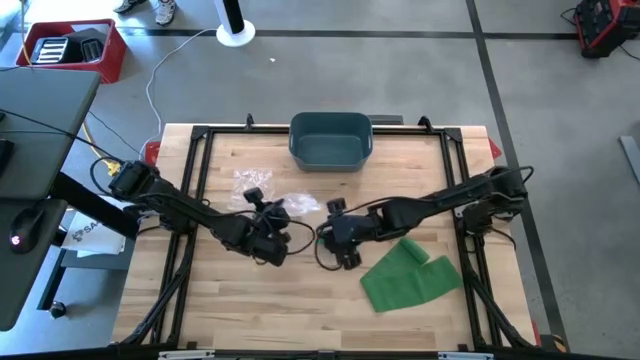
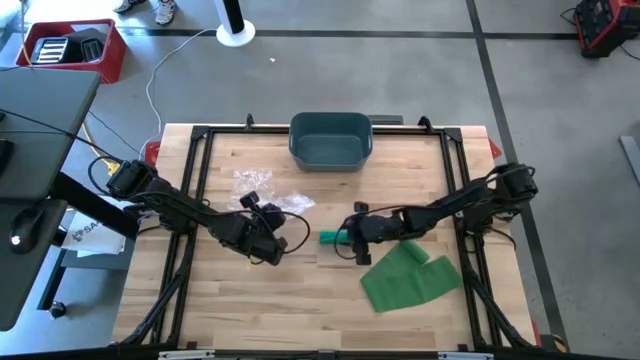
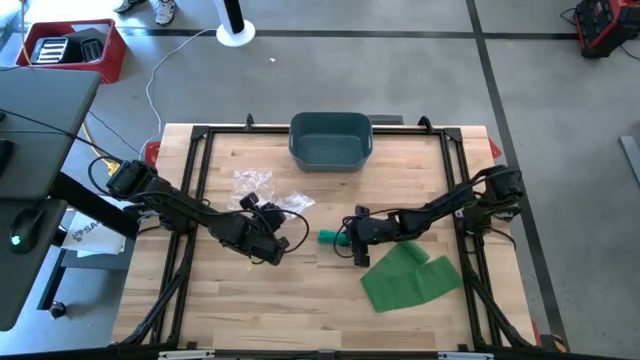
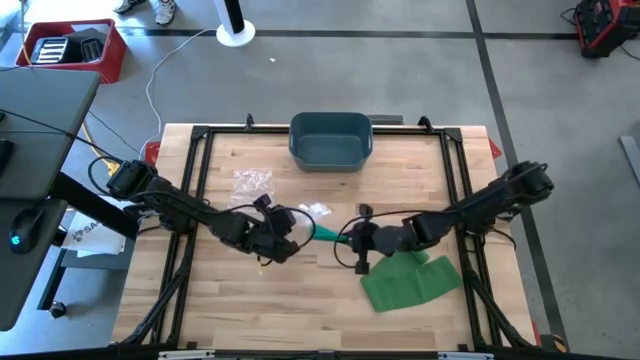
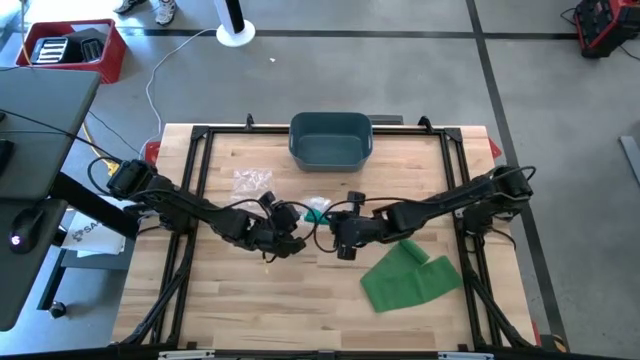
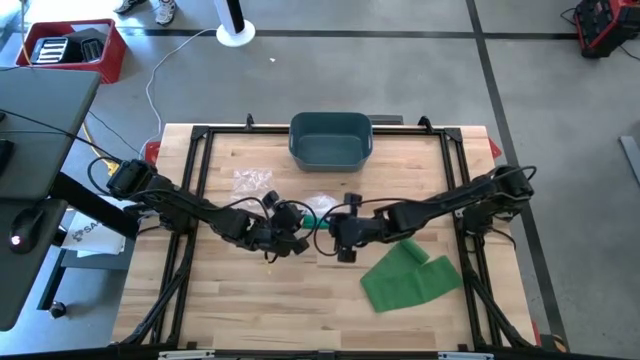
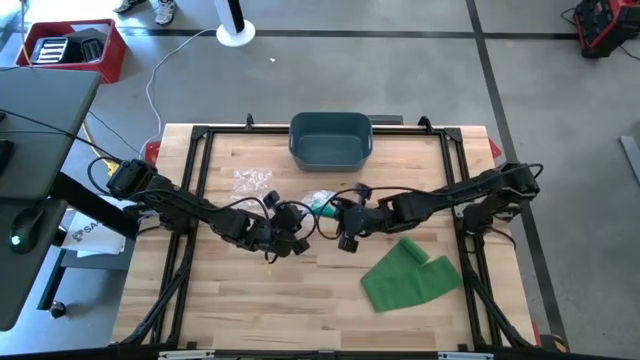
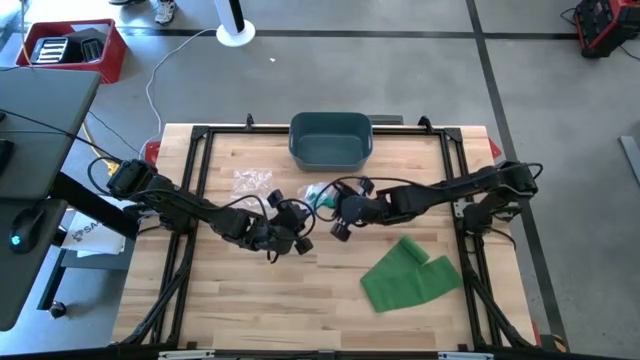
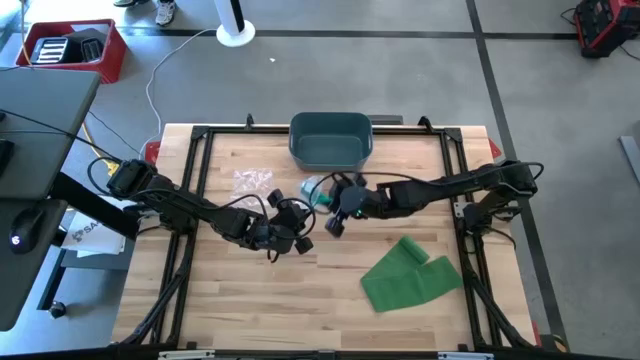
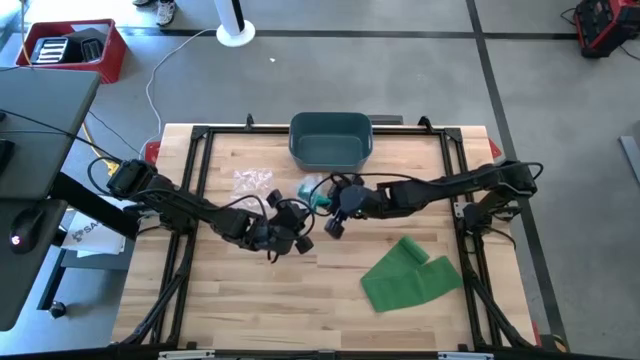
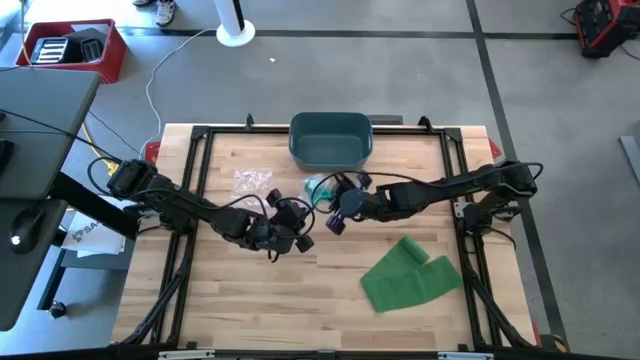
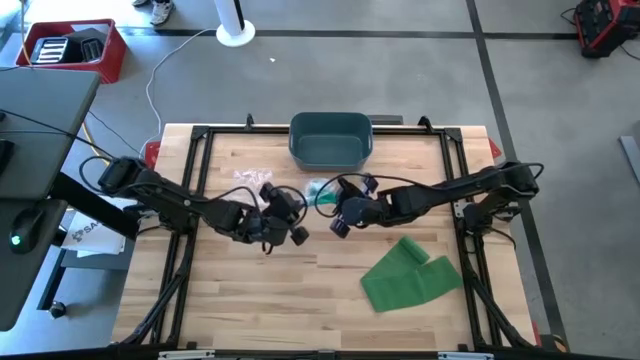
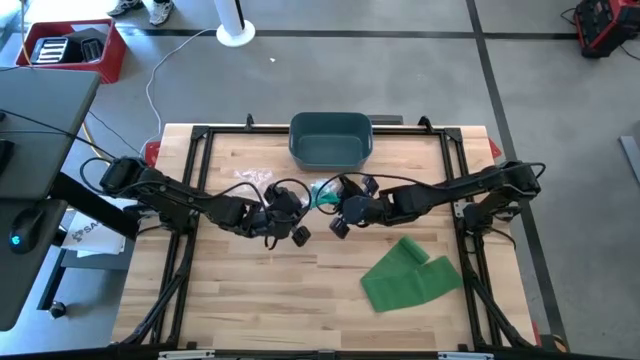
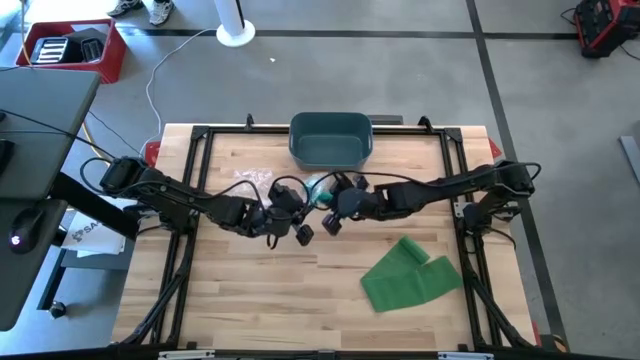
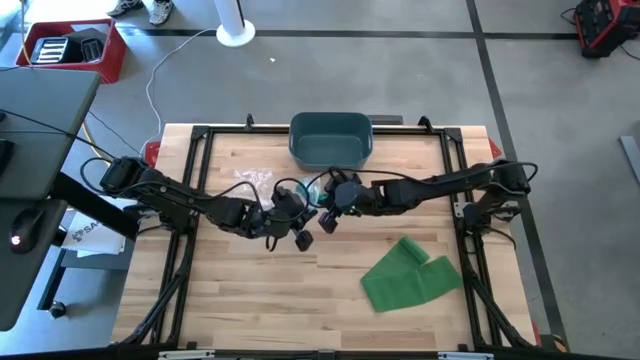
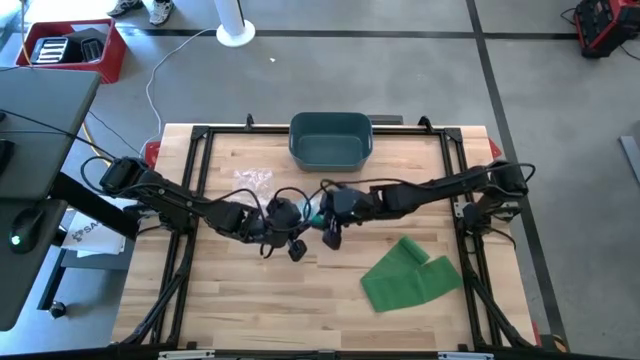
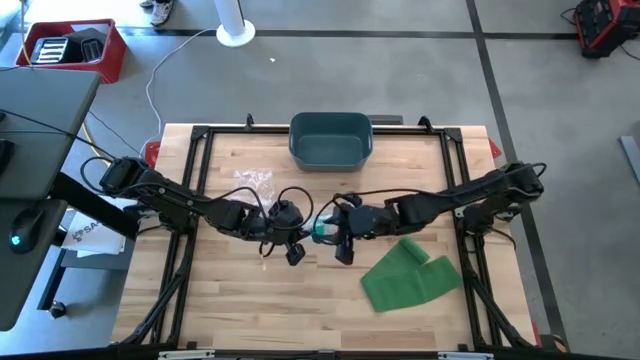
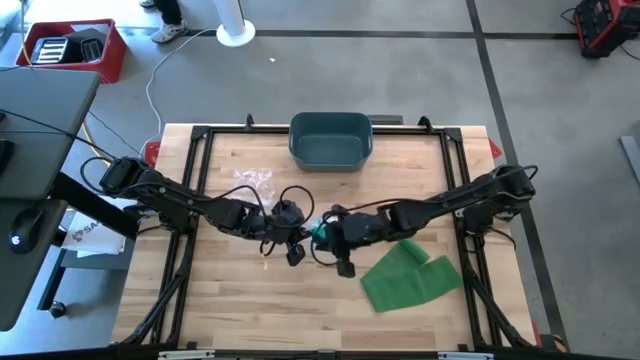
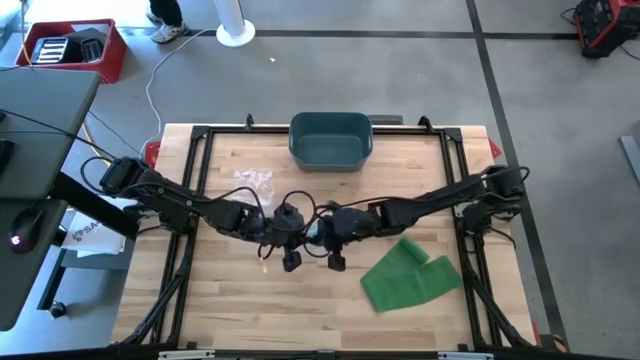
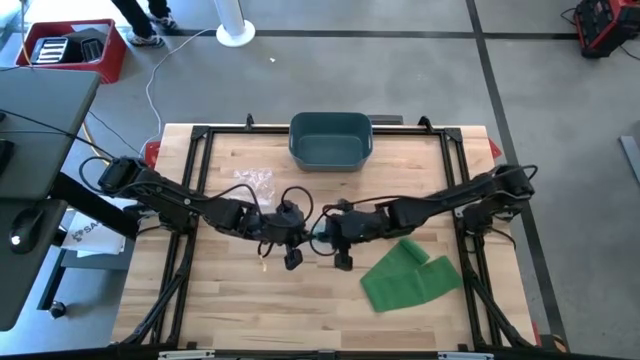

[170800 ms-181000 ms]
Task: Roll bandage
Put the blue bandage into the transparent zip bag

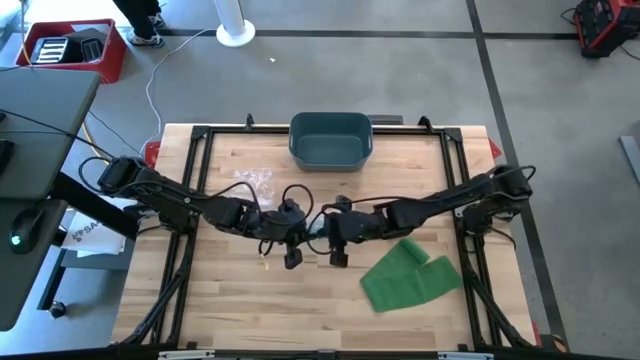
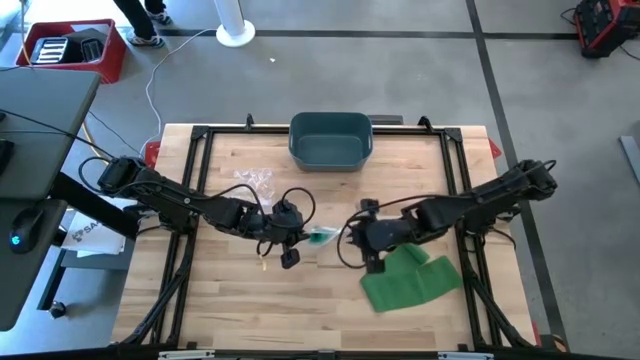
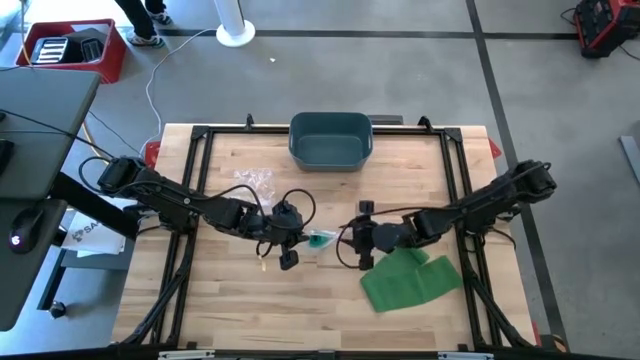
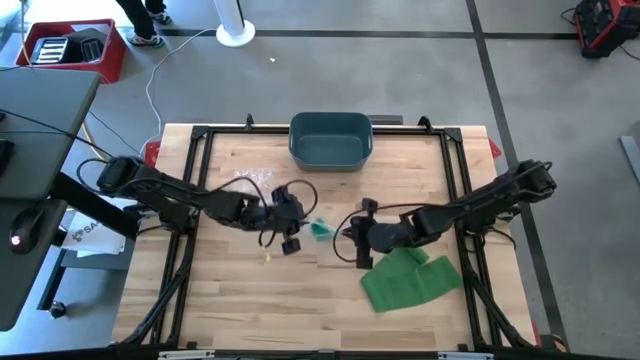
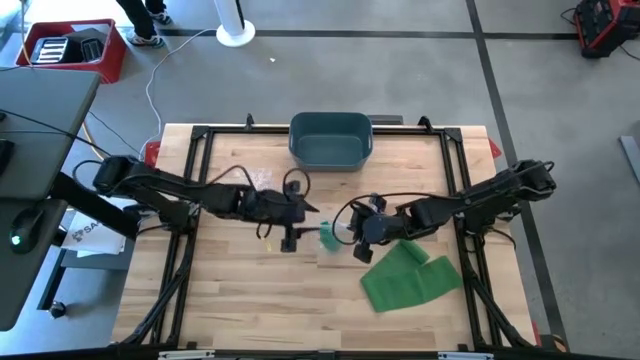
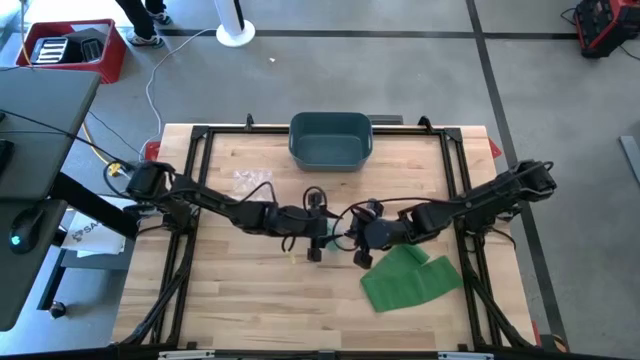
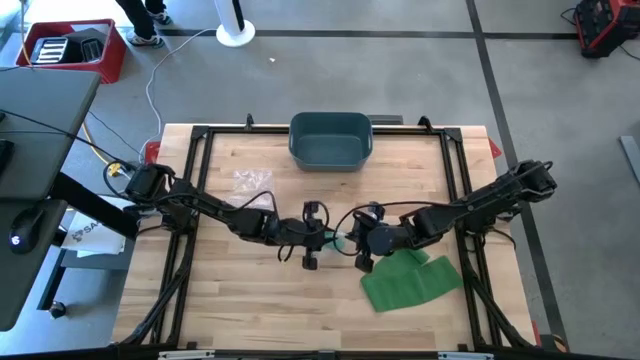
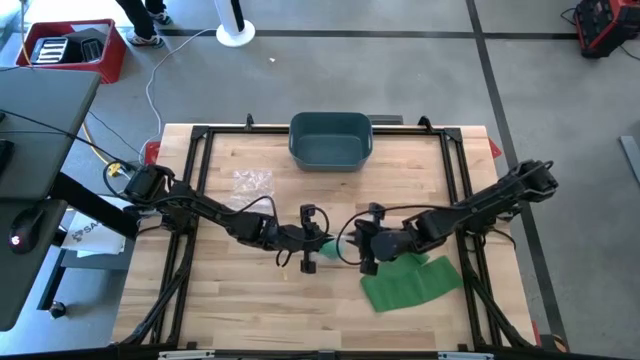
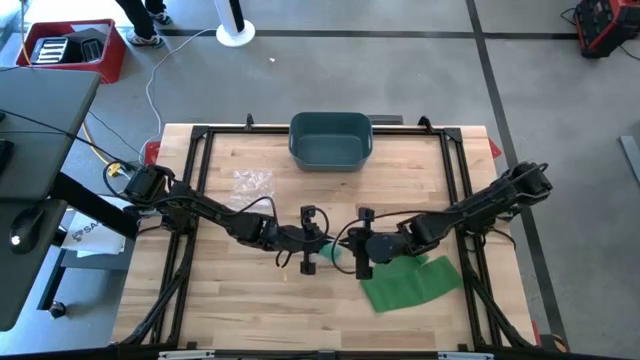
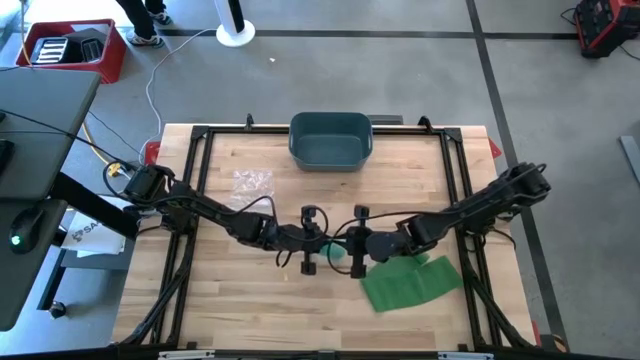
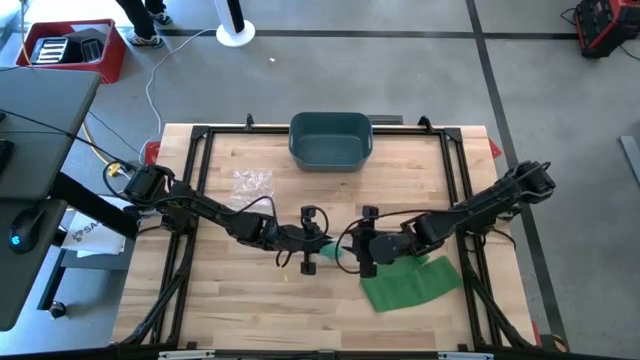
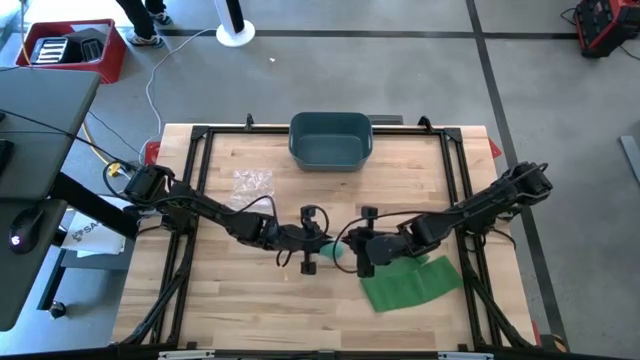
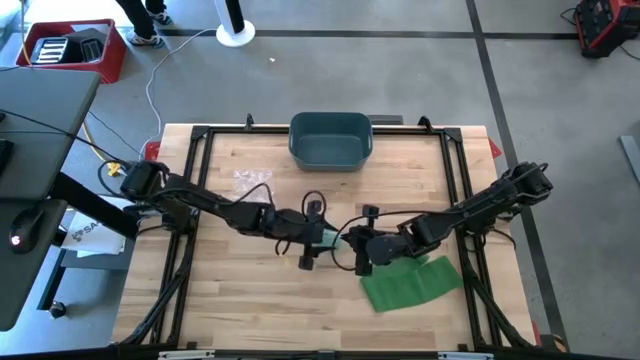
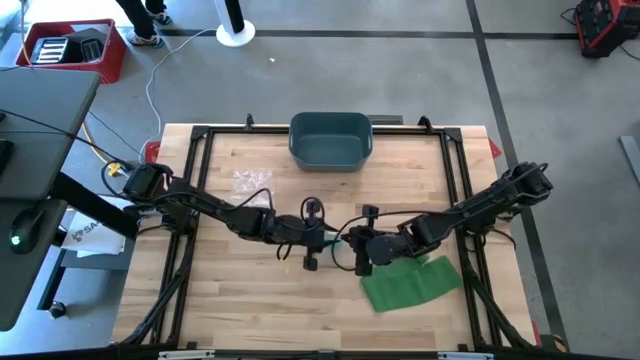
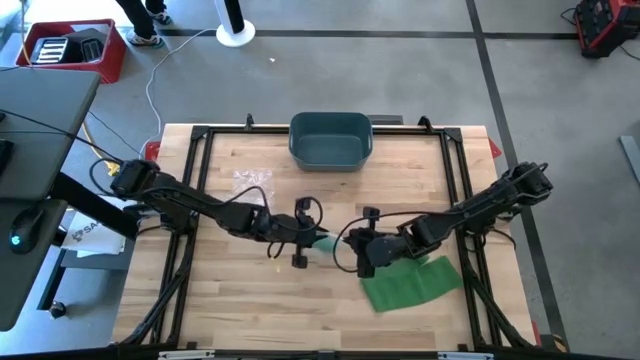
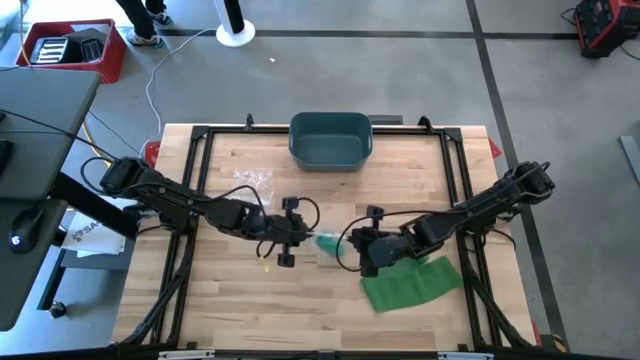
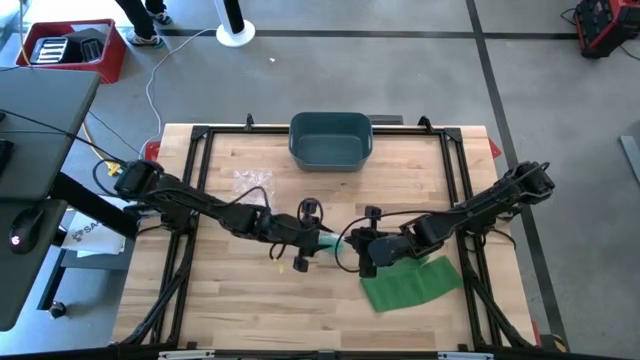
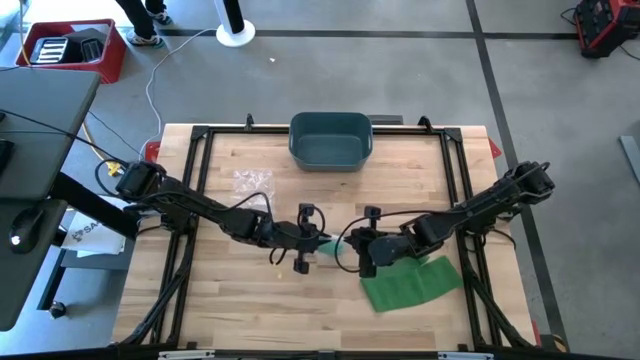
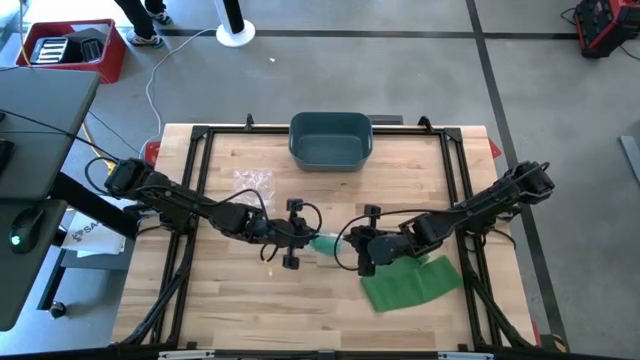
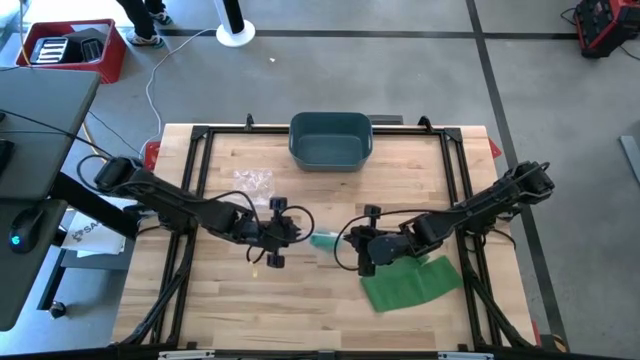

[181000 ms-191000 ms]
Close the transparent zip bag

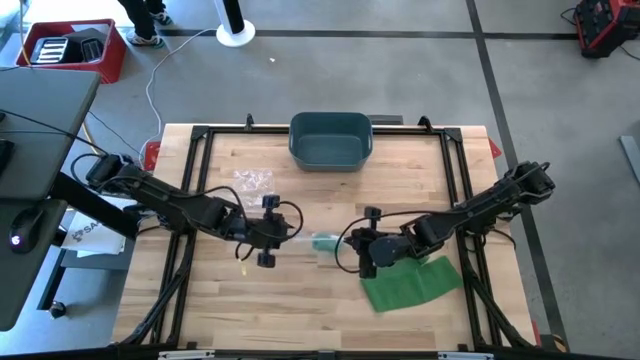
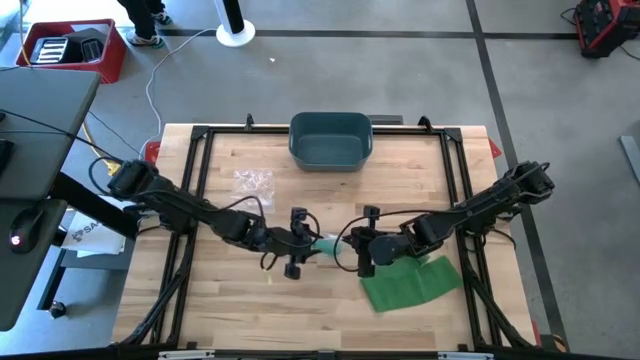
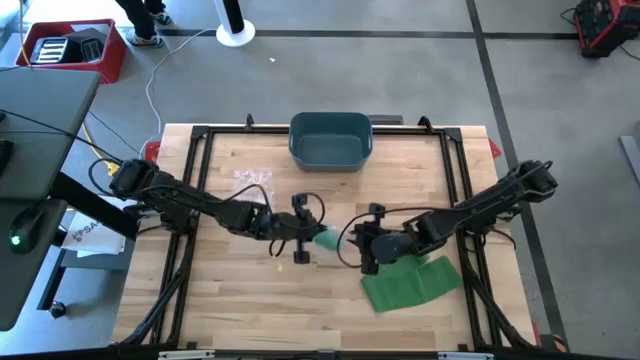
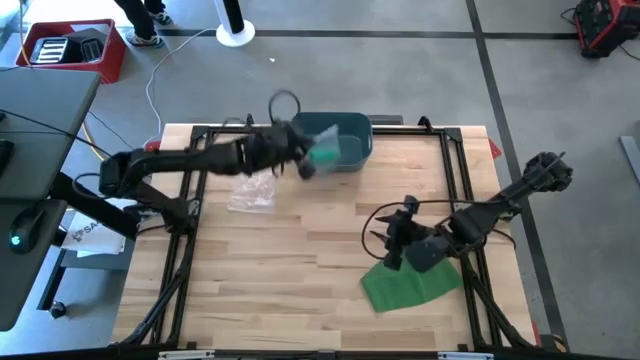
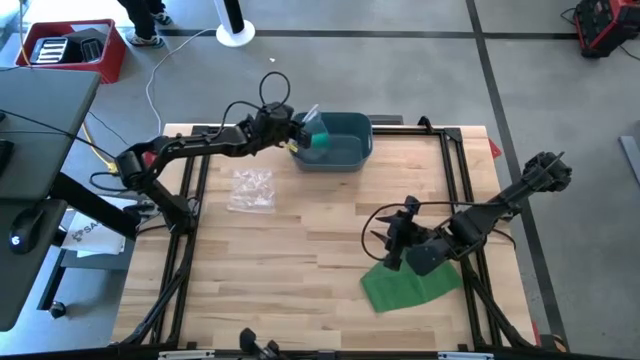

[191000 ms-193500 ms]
Put the transparent zip bag with the blue bandage into the blue bin
